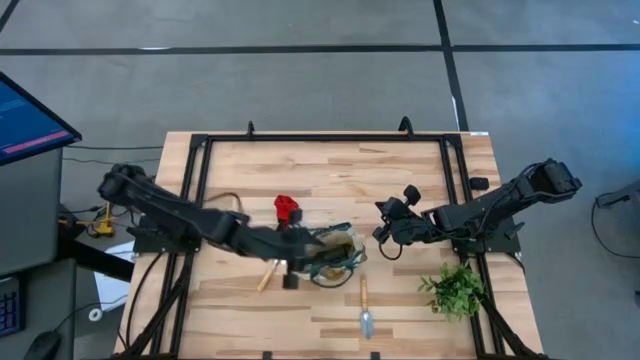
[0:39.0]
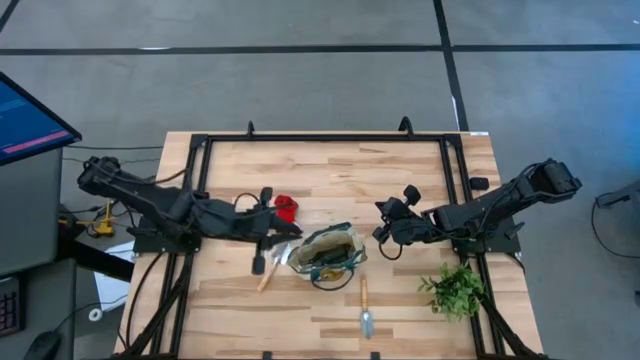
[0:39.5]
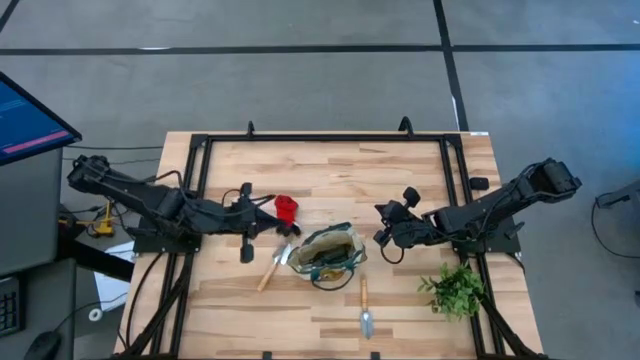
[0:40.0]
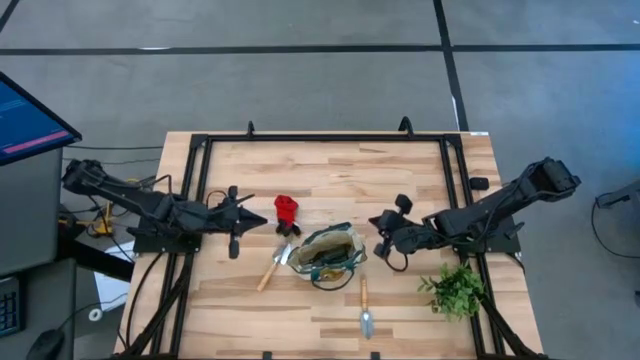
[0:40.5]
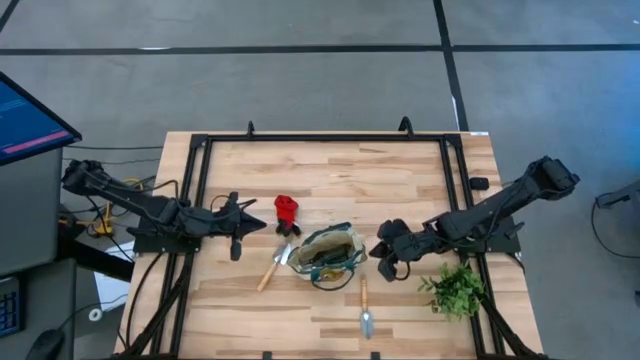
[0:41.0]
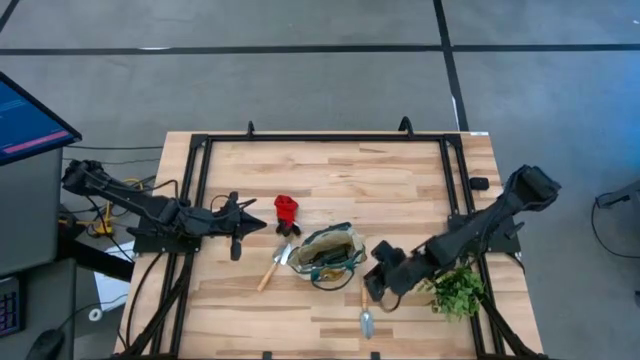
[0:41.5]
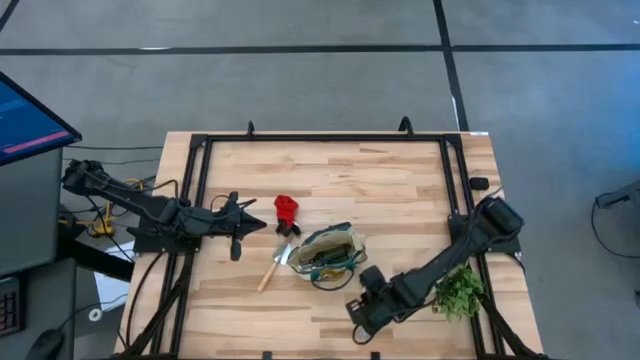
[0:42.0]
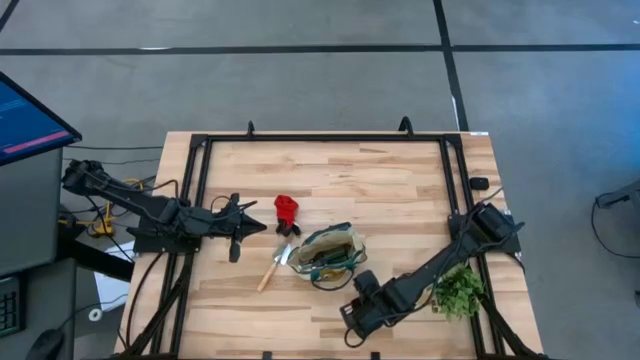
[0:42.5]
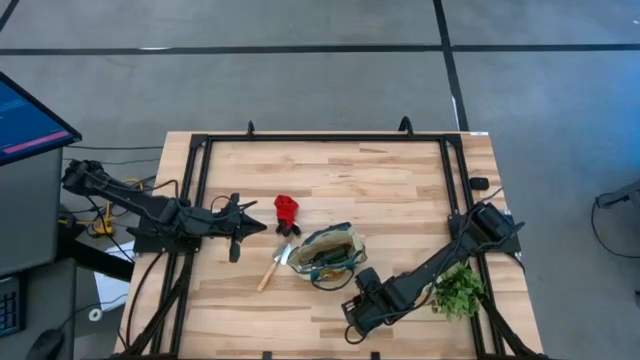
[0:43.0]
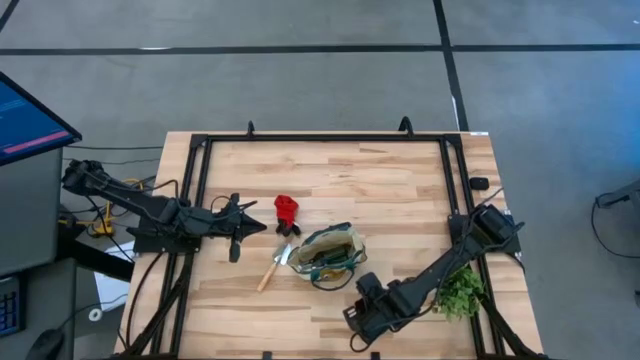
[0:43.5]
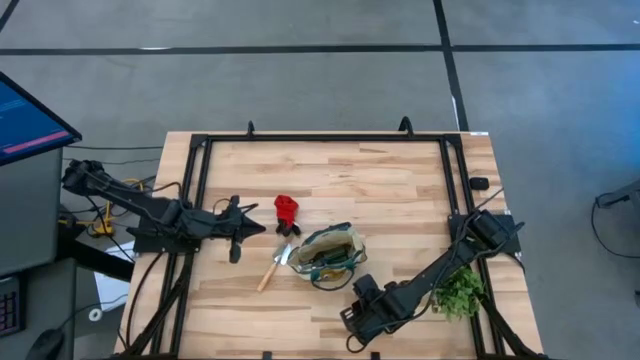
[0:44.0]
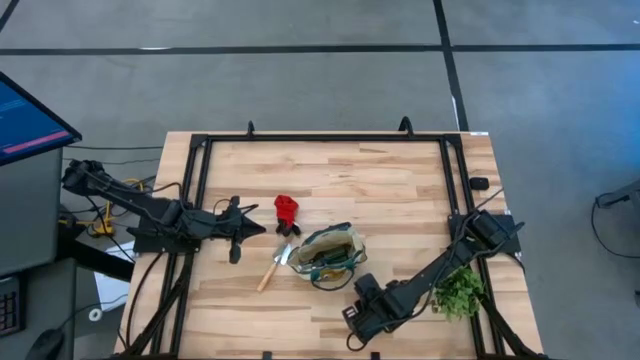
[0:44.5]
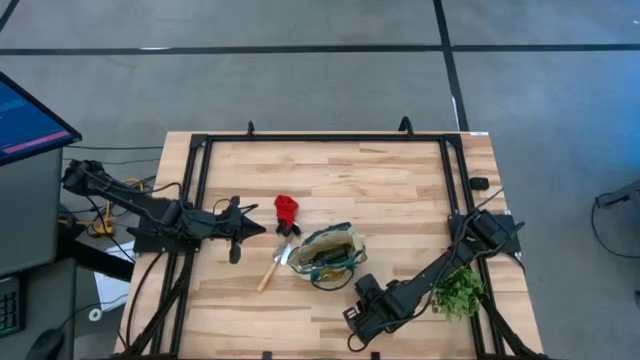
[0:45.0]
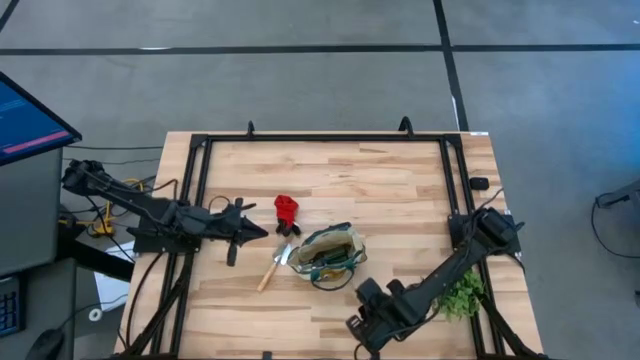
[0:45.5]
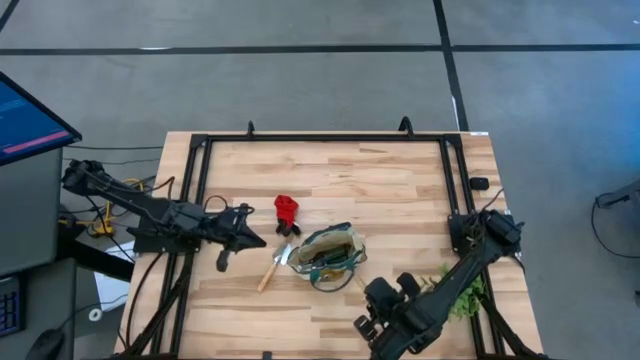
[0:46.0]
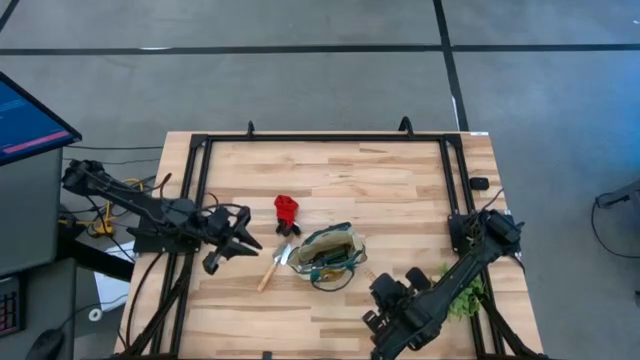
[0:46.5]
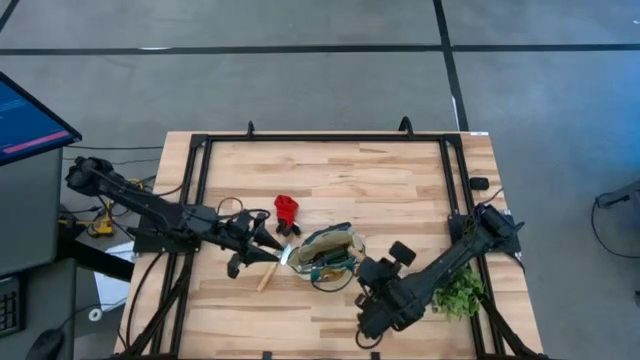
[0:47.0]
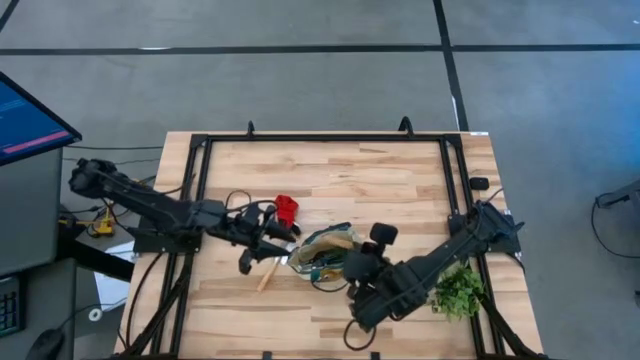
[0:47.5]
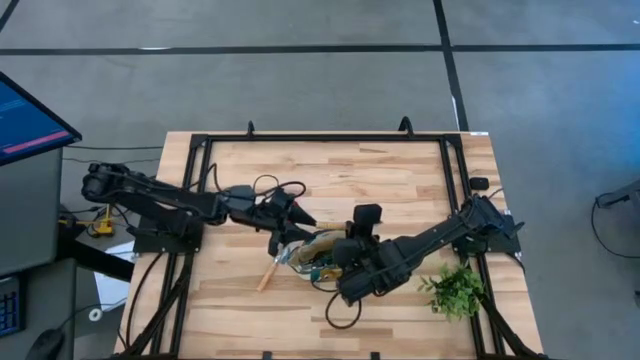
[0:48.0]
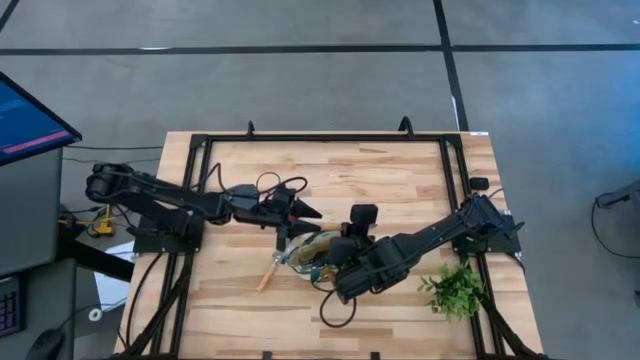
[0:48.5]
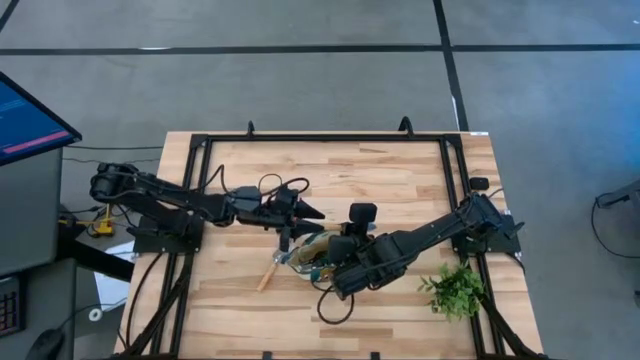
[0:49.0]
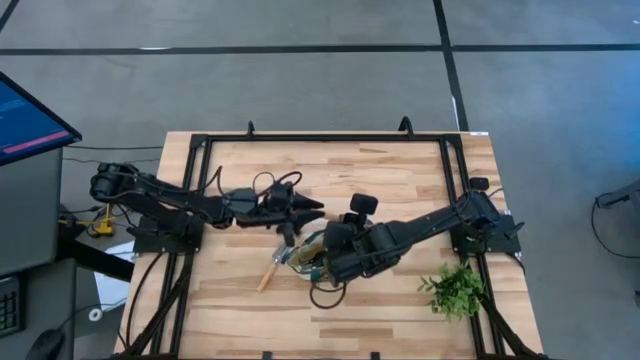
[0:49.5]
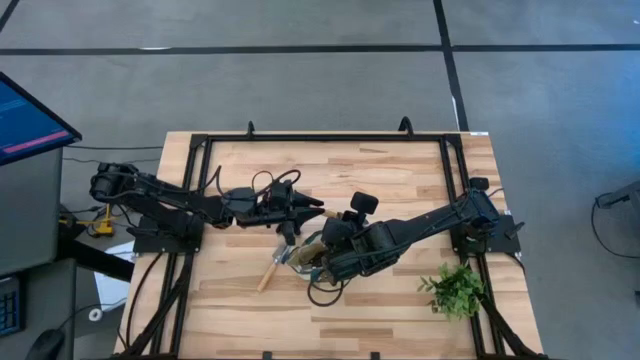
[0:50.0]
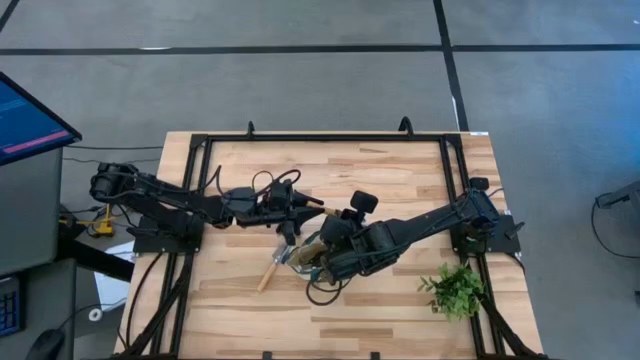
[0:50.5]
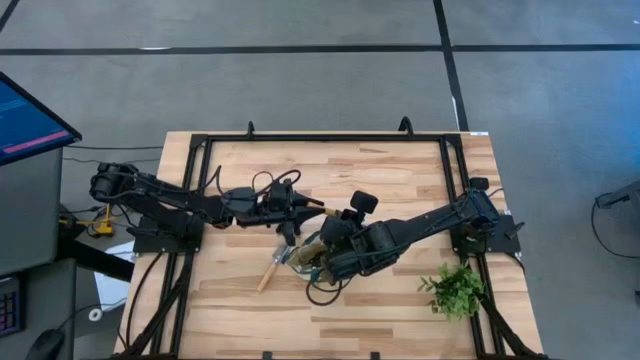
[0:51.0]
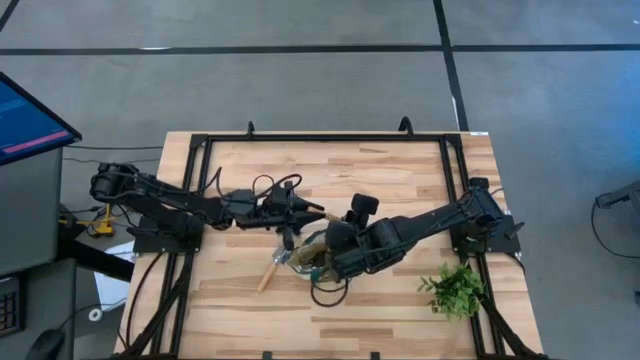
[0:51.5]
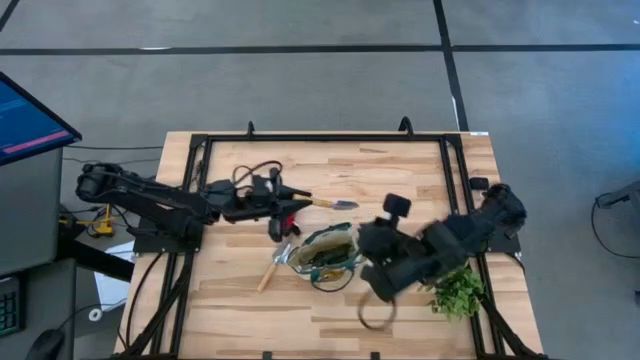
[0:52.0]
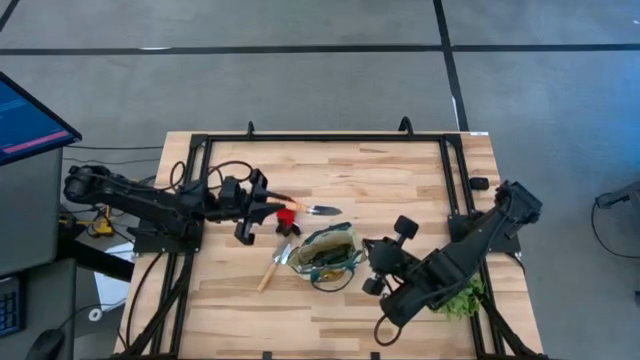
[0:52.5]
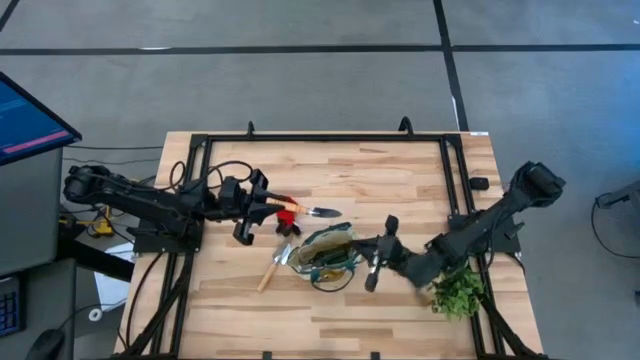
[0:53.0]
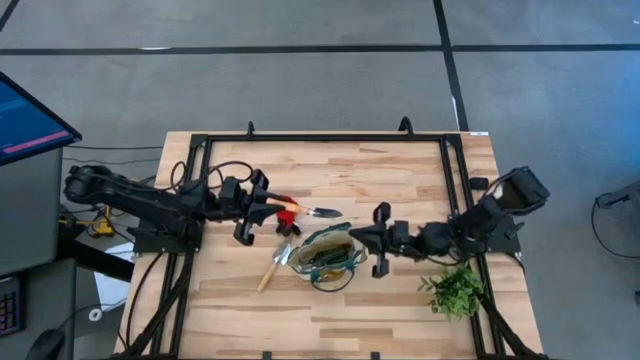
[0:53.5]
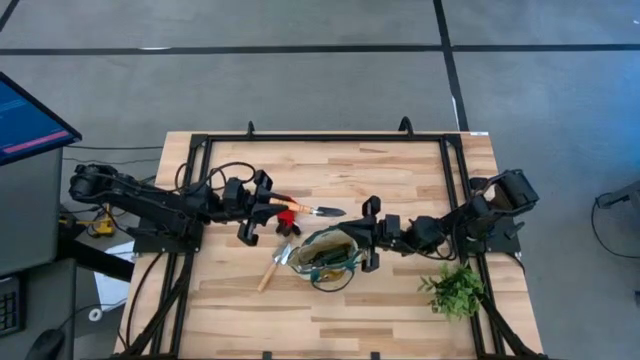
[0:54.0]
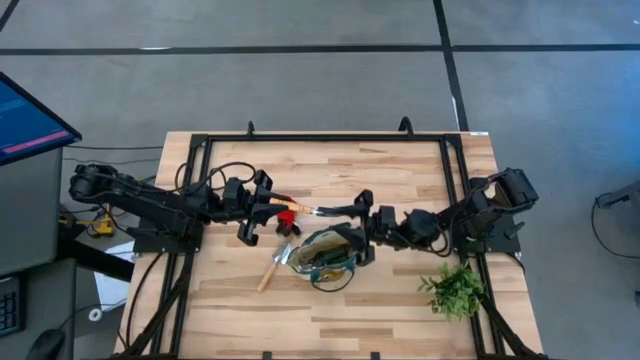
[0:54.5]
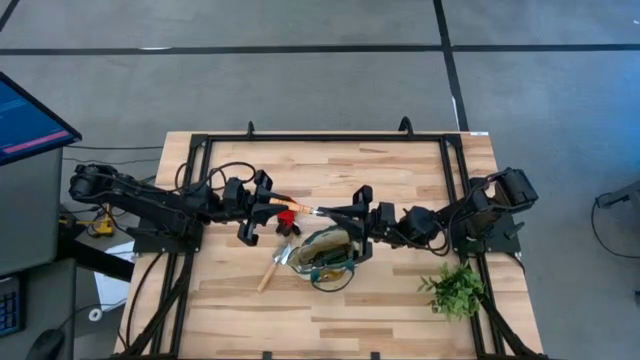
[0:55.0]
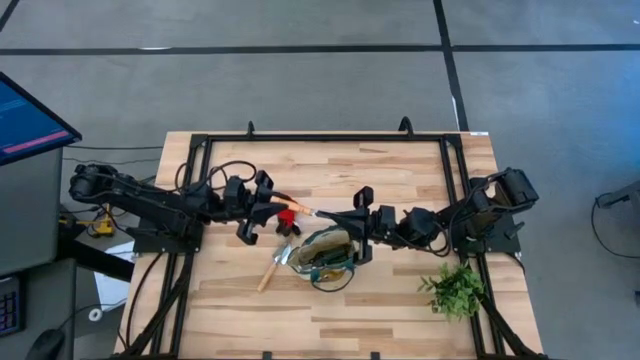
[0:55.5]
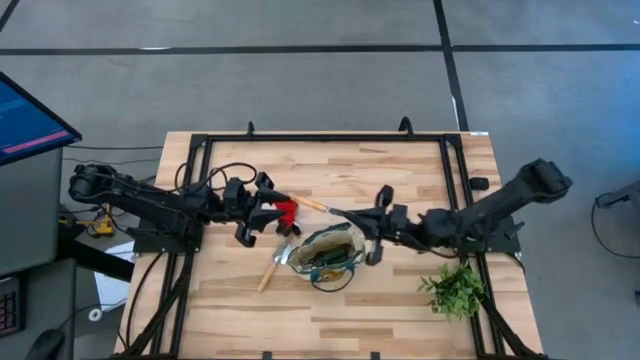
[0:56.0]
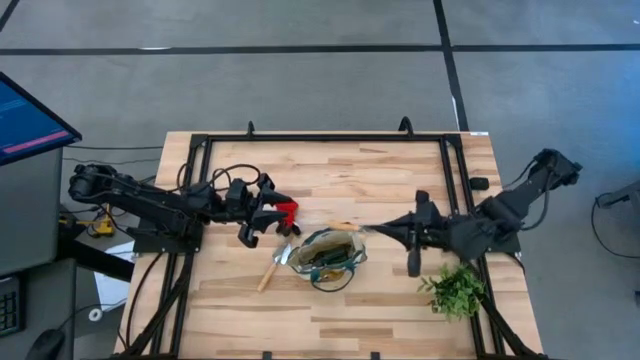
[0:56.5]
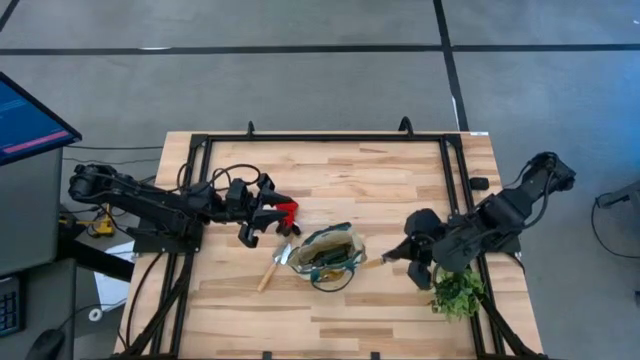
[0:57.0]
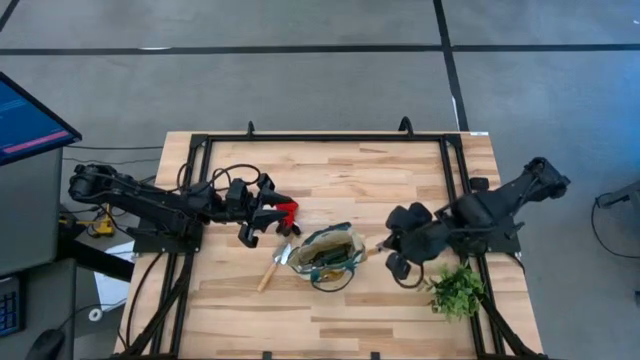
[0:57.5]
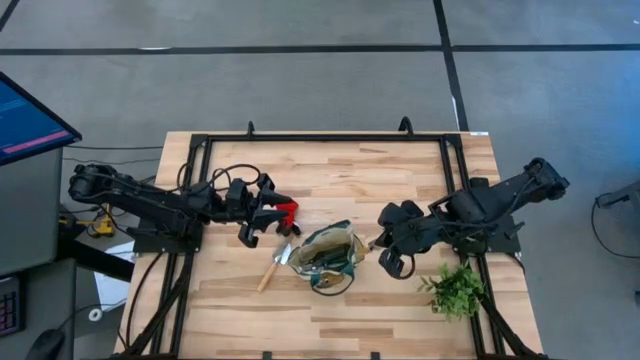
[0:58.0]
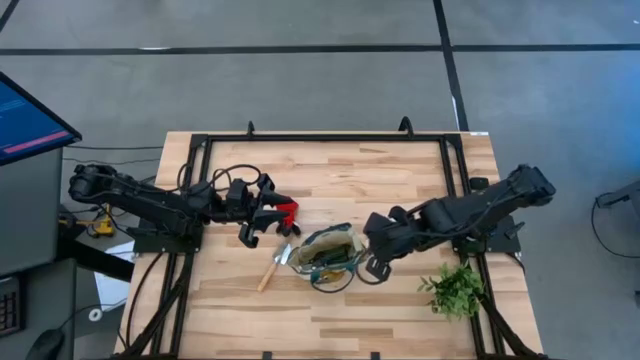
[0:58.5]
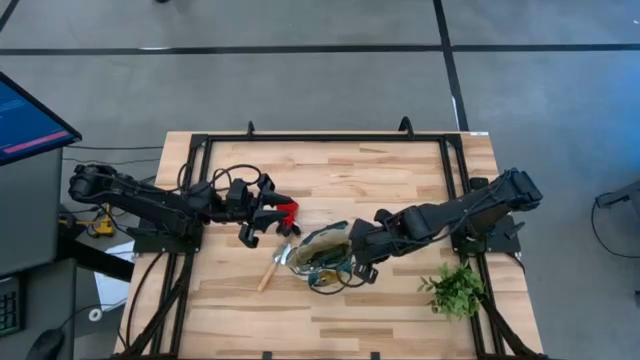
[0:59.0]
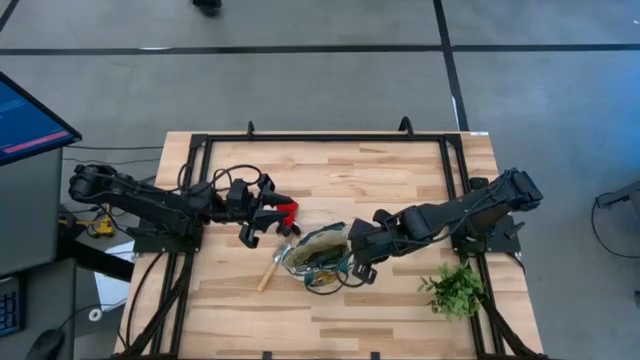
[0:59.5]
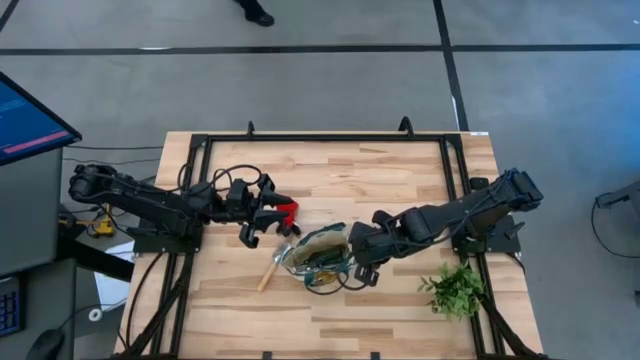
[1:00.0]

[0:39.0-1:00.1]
Task: Pick & Place Garden tools in Gardening bag
Put the bottom trowel into the gardening bag
